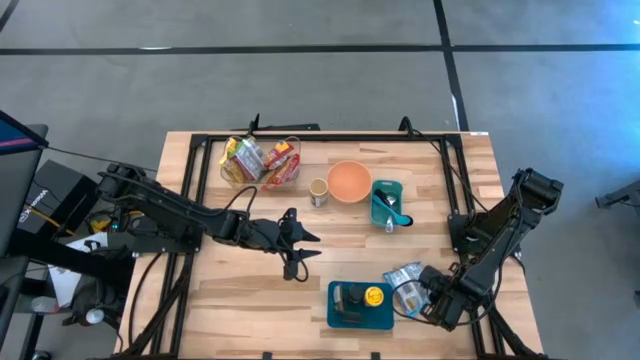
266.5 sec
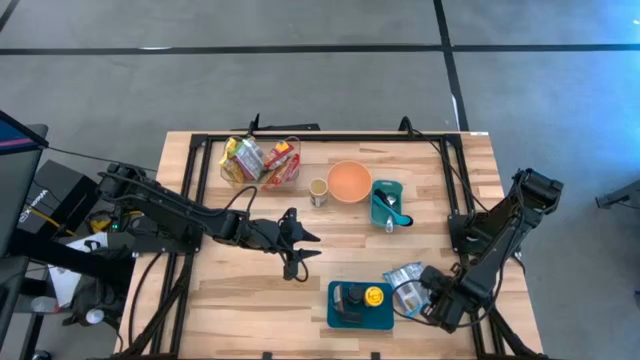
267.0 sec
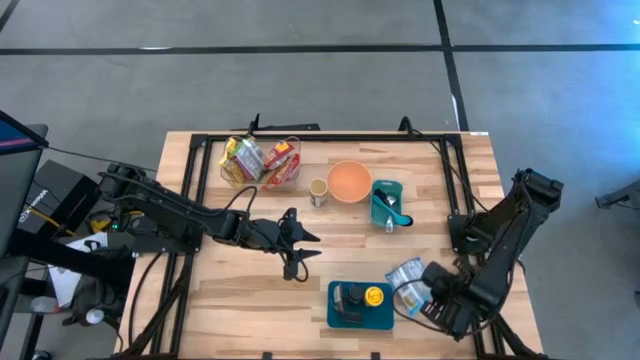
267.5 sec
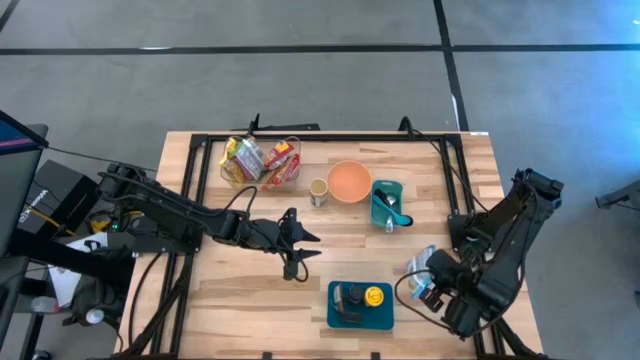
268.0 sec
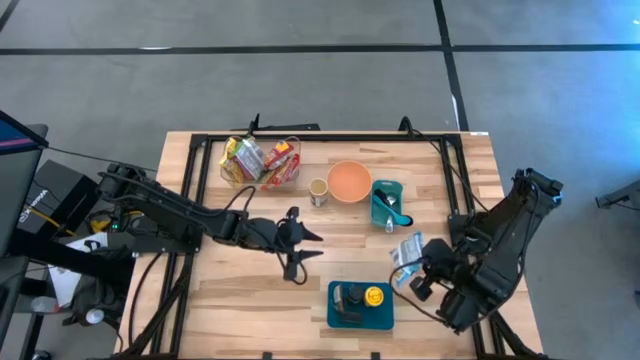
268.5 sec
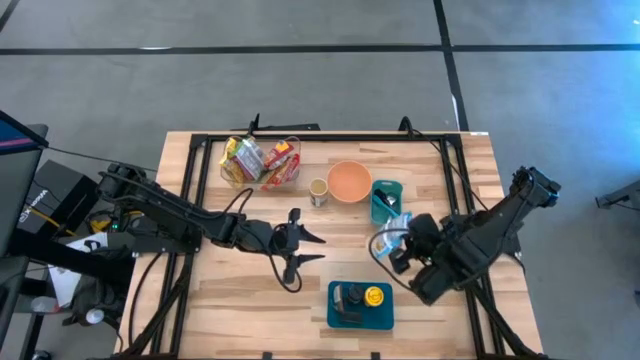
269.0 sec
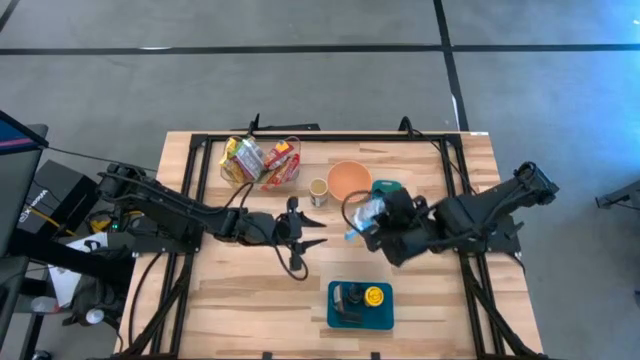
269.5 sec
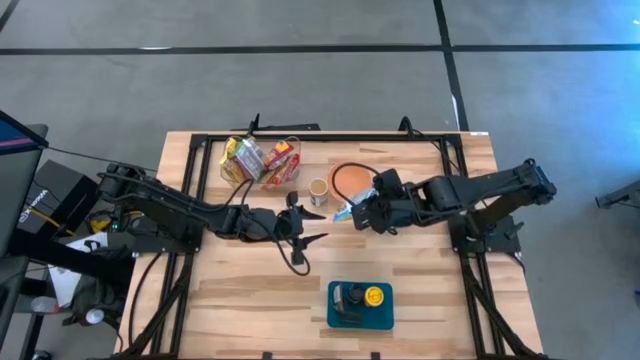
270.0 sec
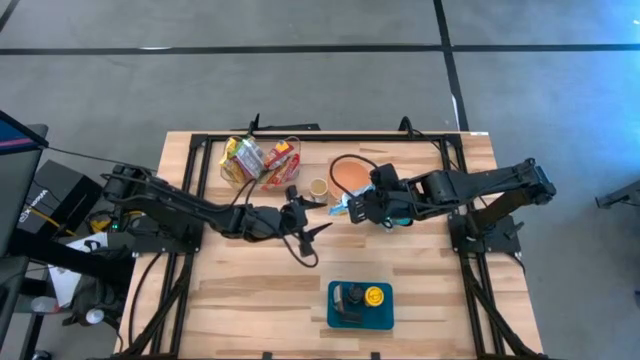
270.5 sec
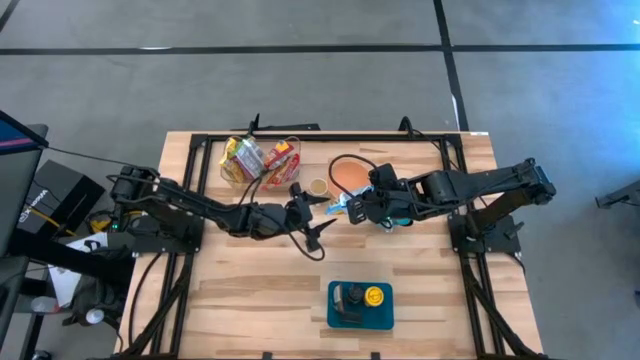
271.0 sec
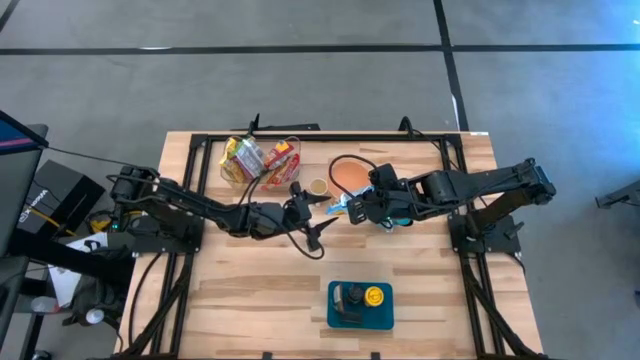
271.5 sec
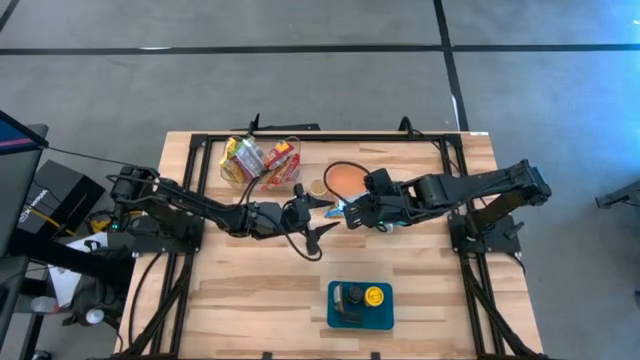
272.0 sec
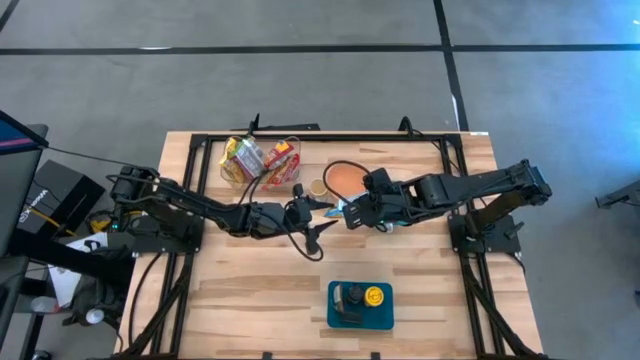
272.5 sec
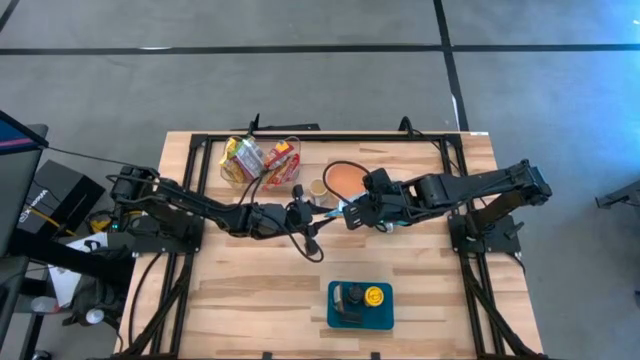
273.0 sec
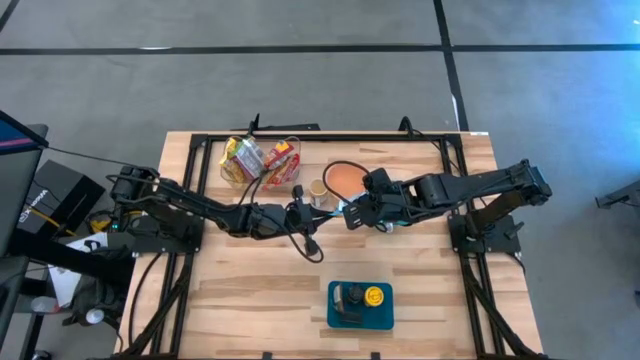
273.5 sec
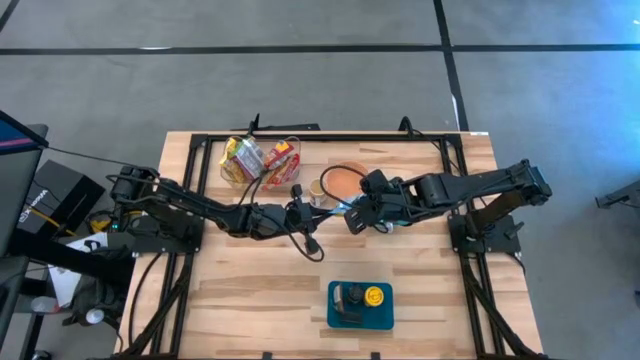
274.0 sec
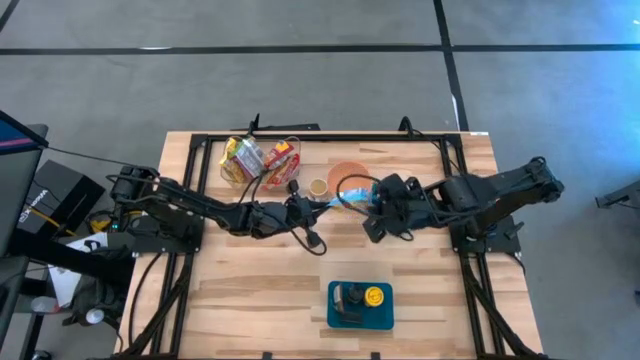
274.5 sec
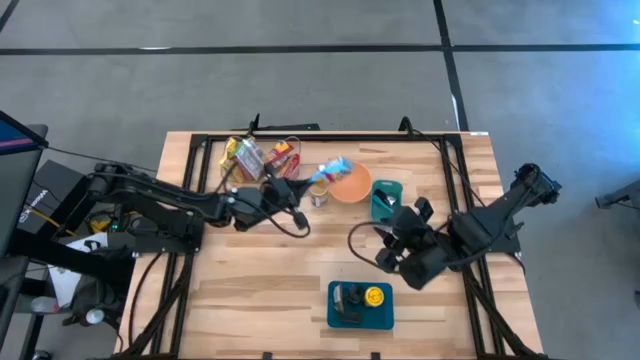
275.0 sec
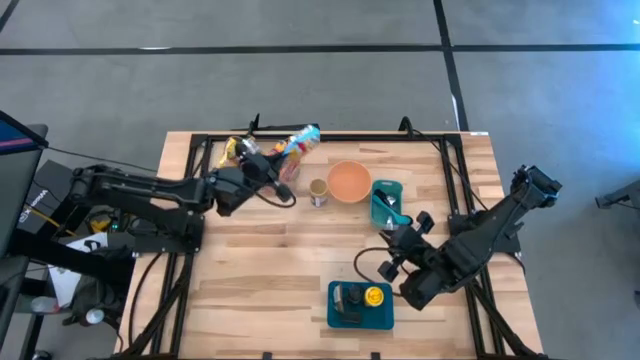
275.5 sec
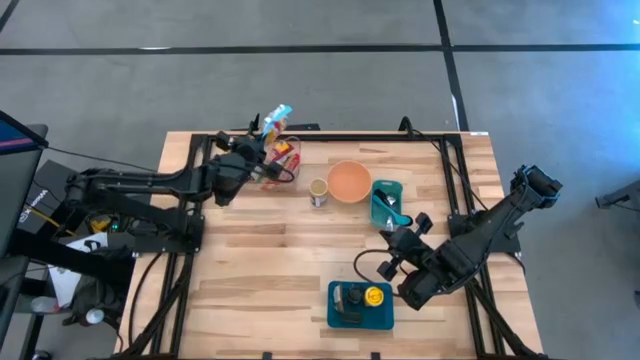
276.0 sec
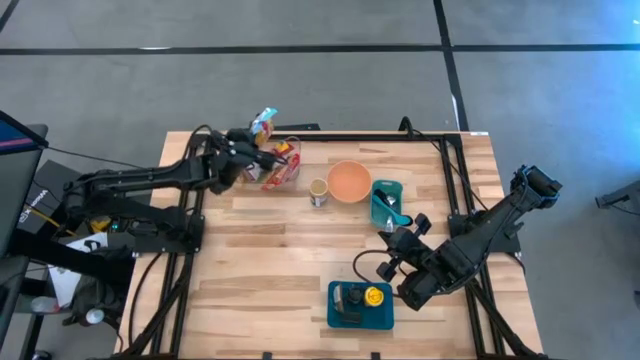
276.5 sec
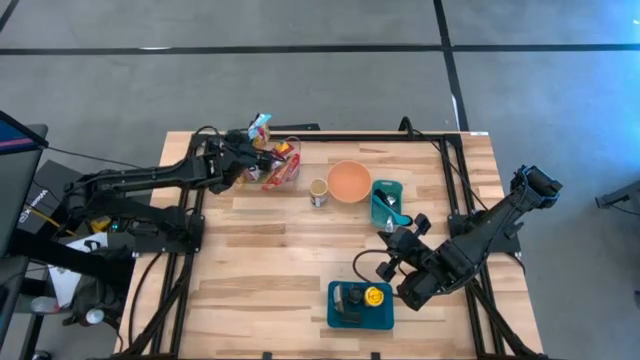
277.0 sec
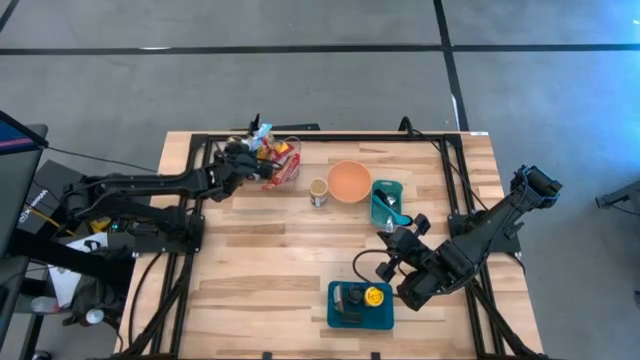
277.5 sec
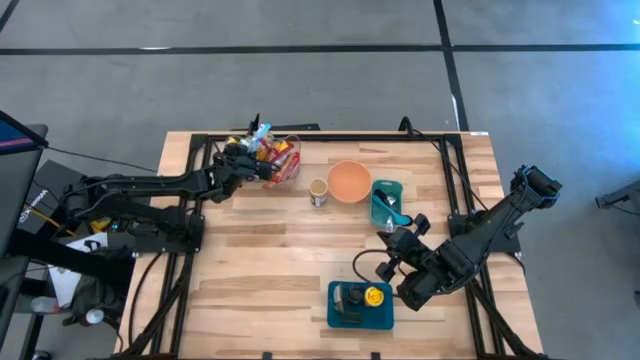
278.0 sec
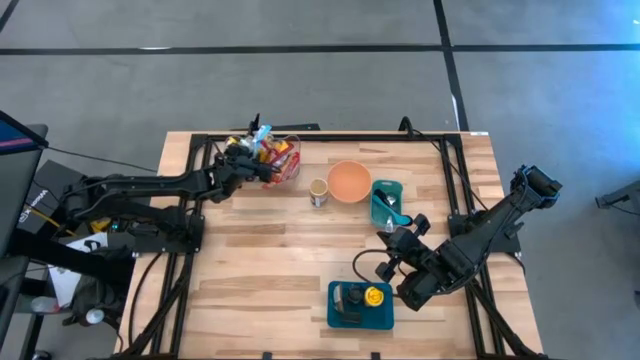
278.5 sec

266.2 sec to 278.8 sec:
Task: Pick & Place Food Item
Put the blue noodle pack into the transparent bin

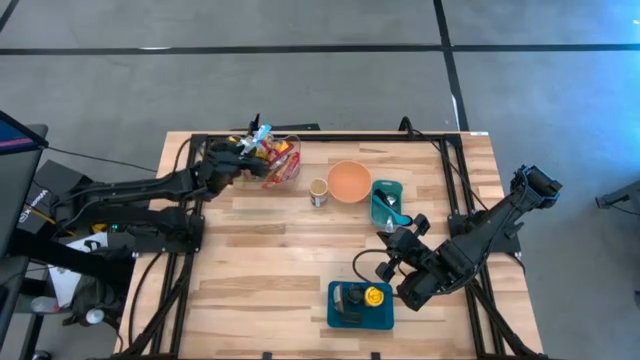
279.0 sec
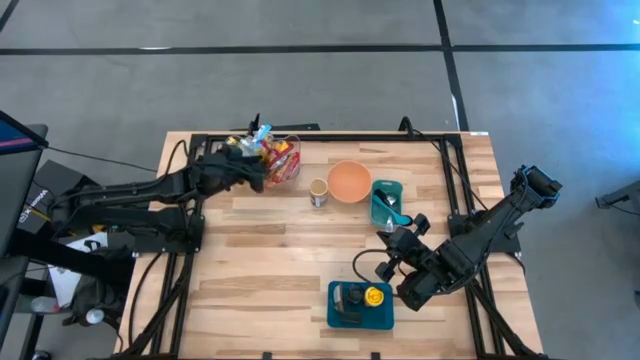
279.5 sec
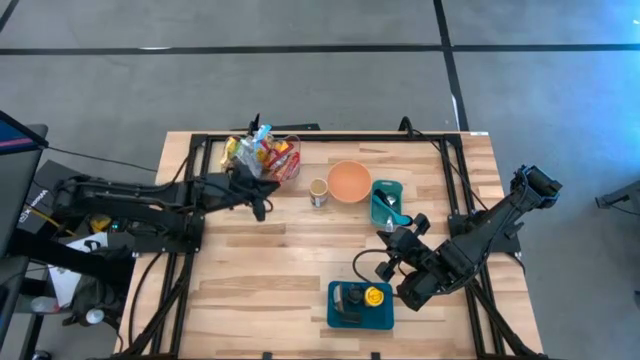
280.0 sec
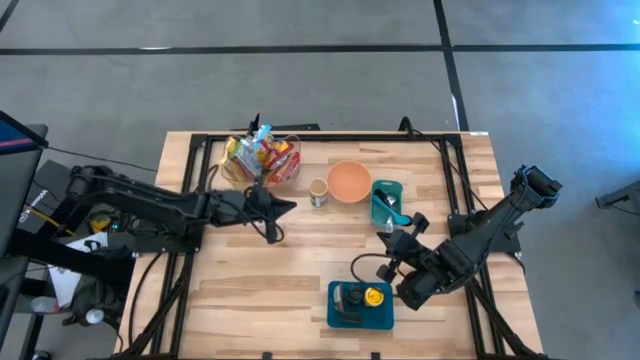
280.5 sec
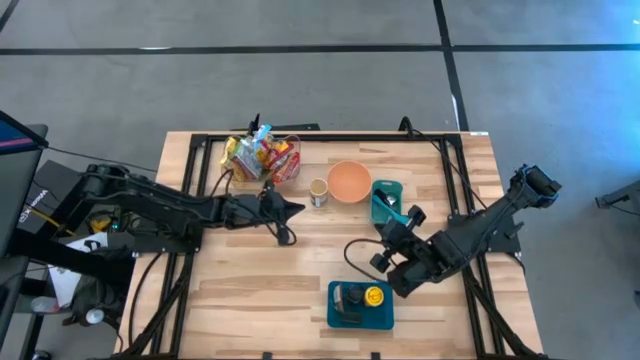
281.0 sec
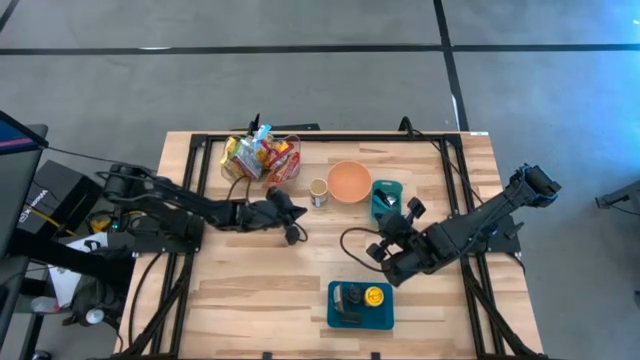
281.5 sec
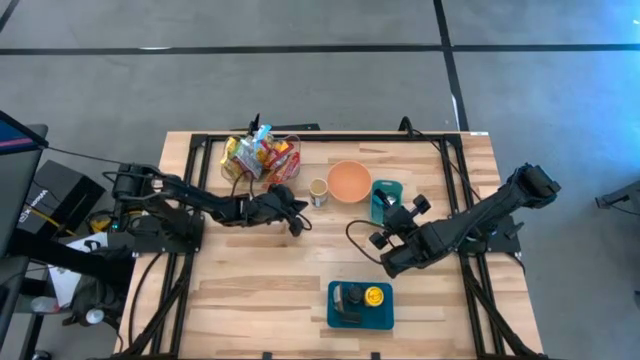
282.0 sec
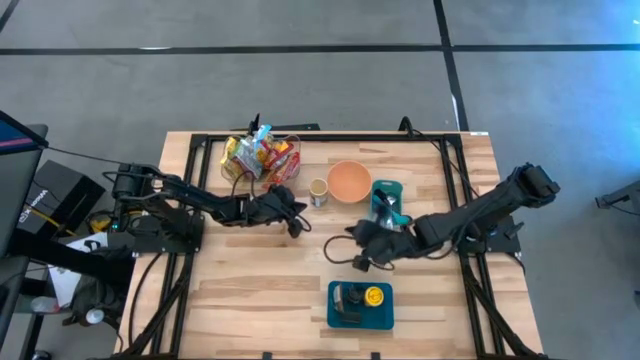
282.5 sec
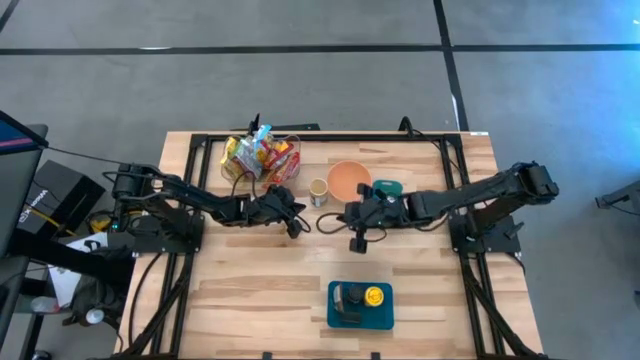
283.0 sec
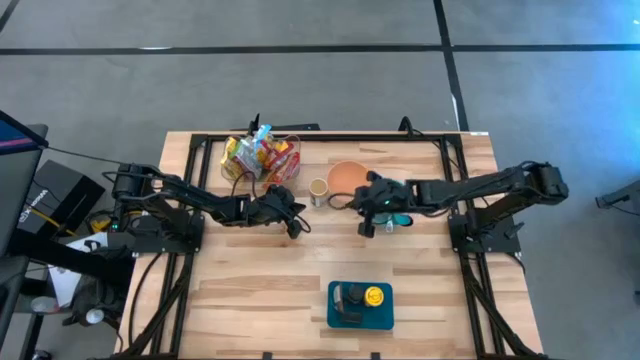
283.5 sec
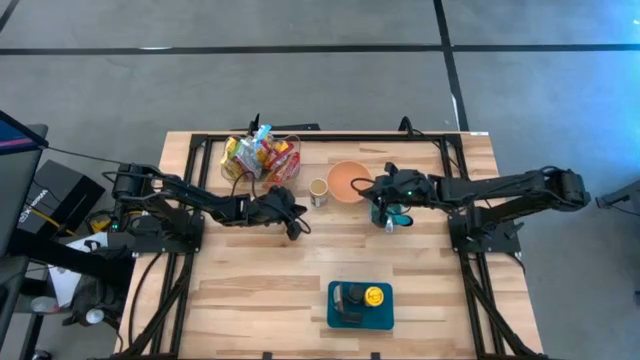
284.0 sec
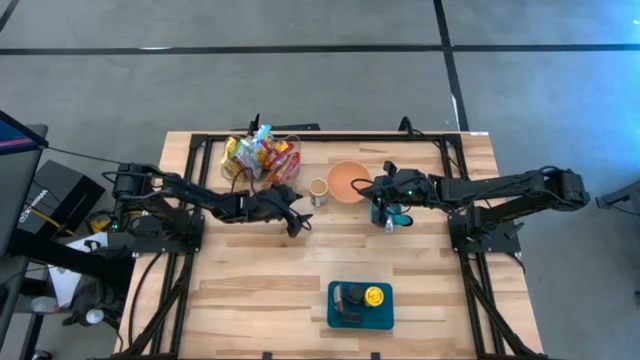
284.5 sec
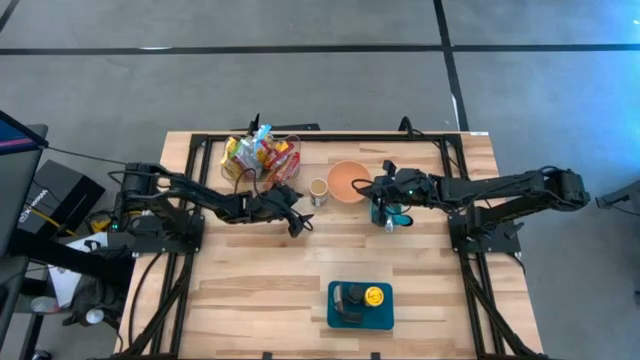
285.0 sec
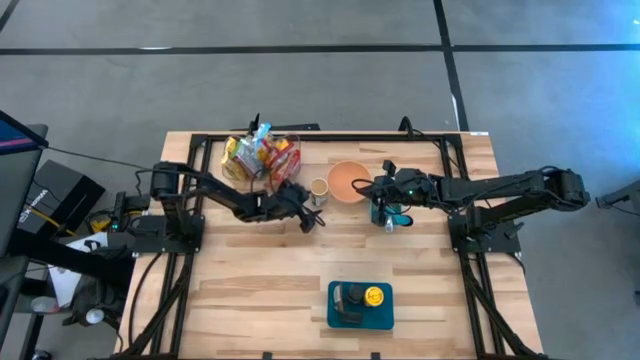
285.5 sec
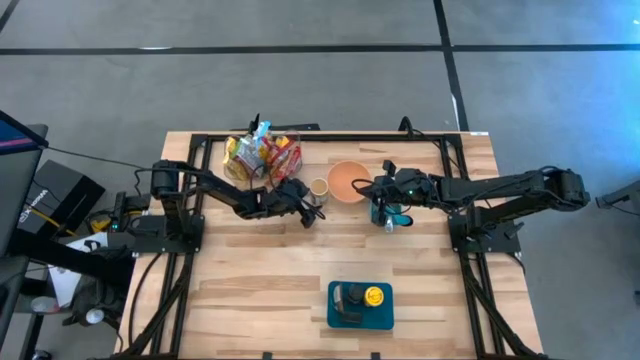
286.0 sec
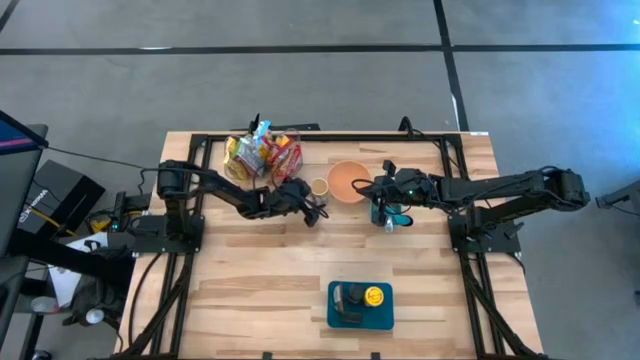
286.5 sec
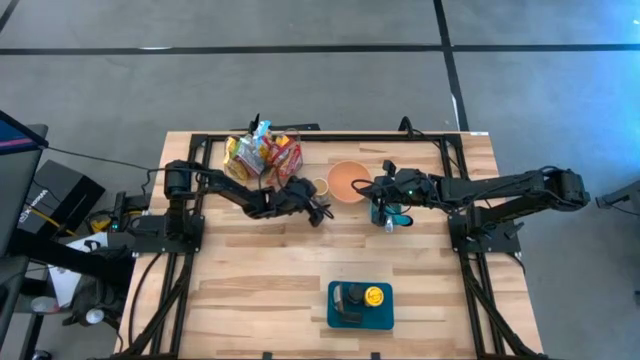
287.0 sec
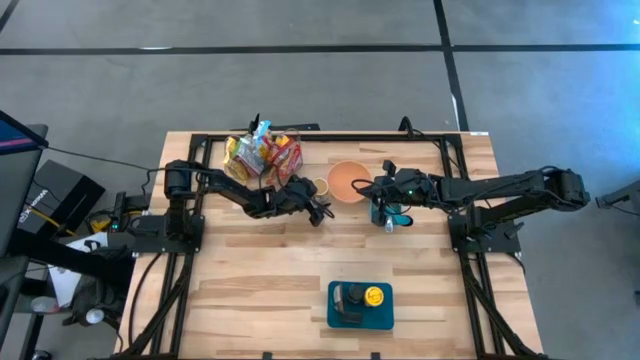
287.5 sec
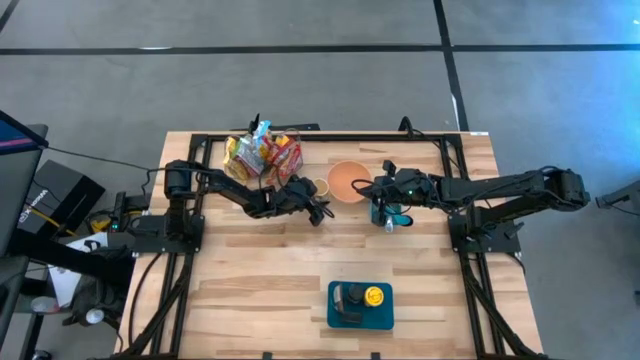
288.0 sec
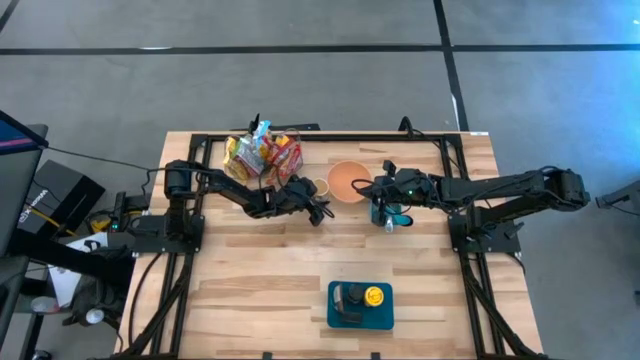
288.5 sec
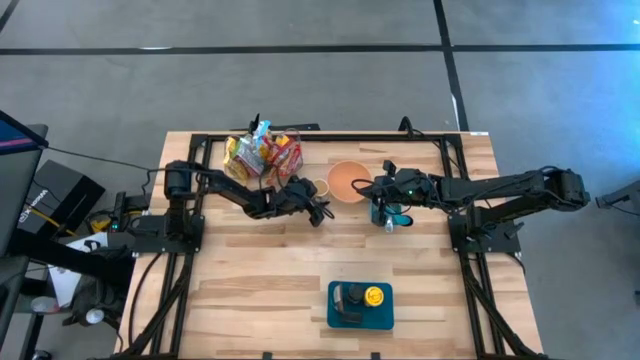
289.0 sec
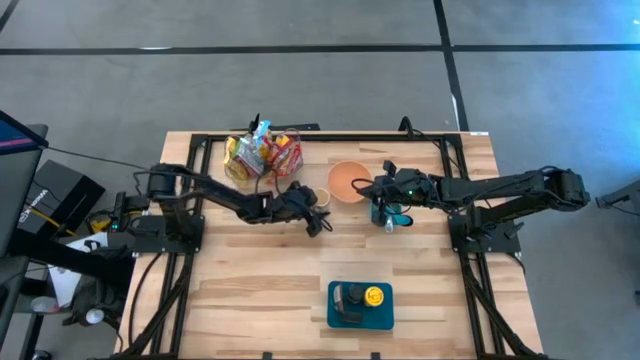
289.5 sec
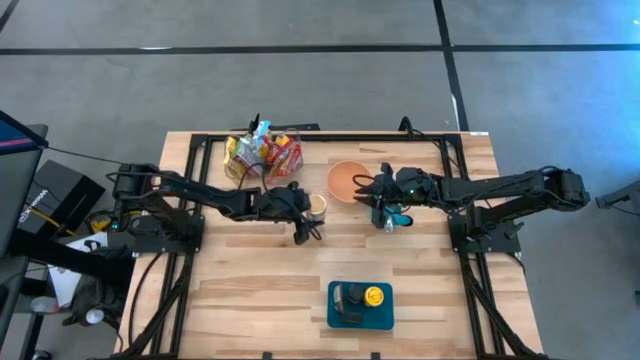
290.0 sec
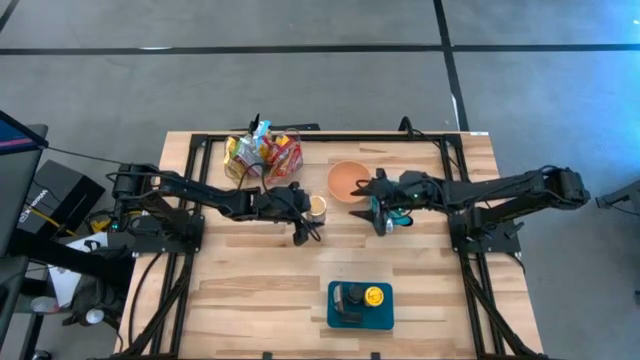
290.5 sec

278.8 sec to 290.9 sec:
Put the gold seasoning bottle into the blue bin
